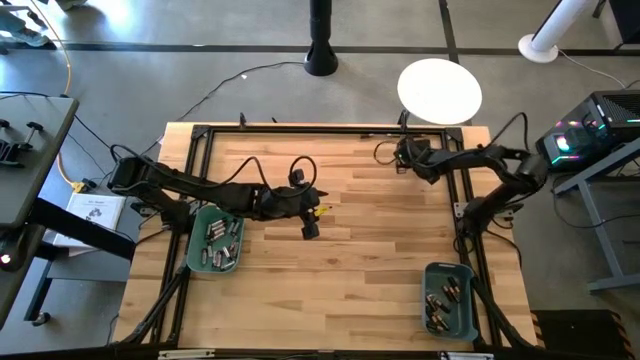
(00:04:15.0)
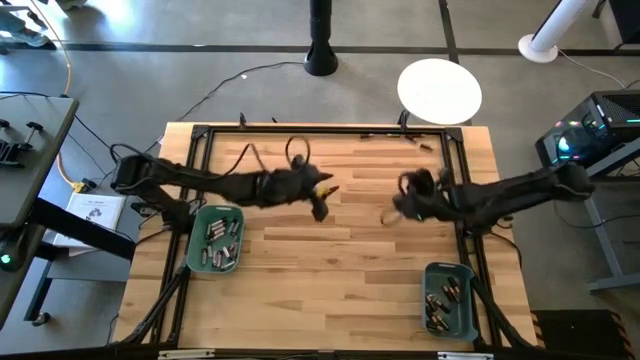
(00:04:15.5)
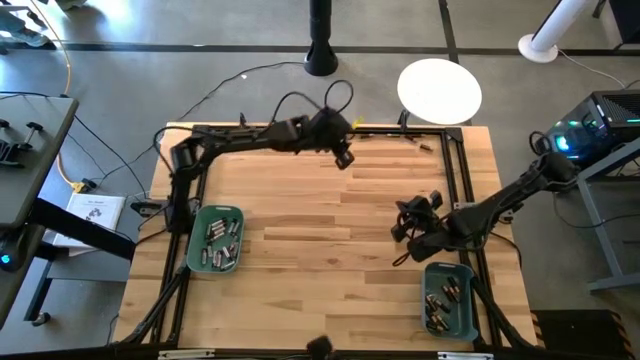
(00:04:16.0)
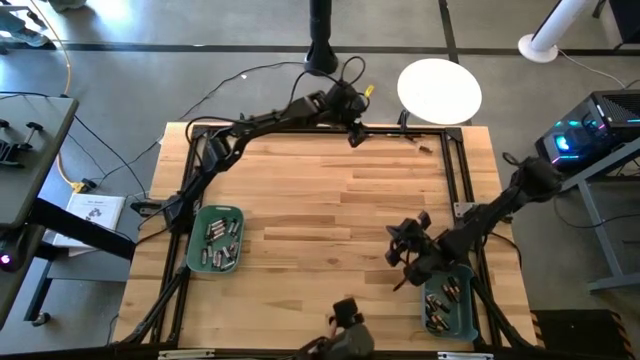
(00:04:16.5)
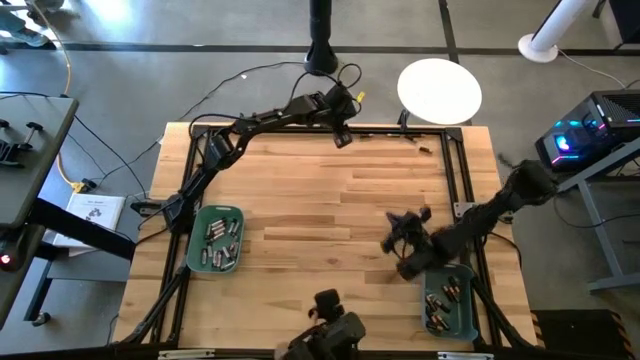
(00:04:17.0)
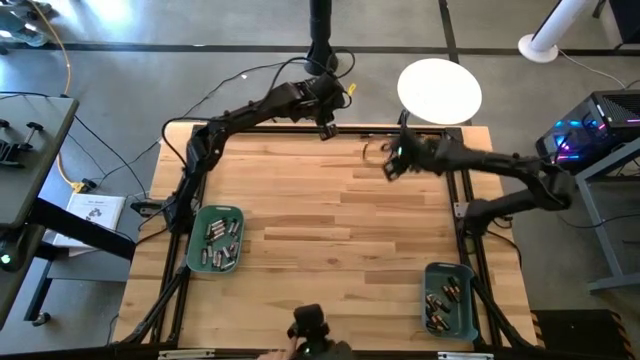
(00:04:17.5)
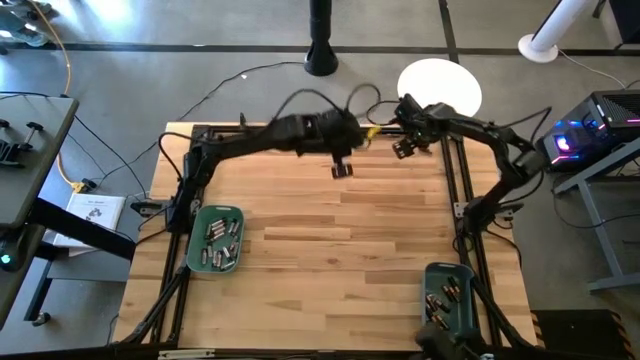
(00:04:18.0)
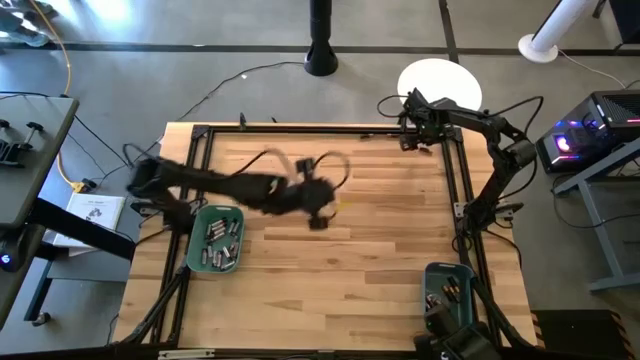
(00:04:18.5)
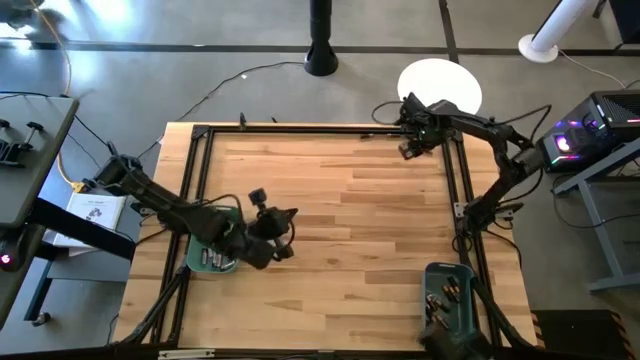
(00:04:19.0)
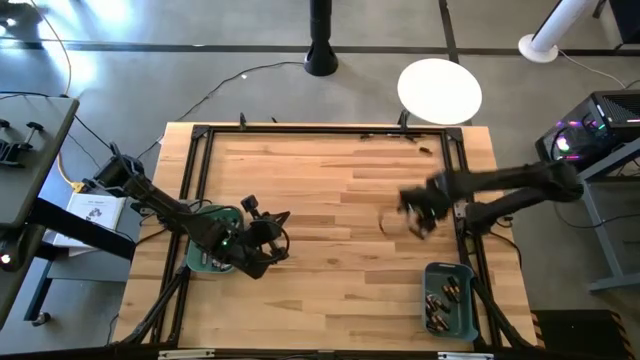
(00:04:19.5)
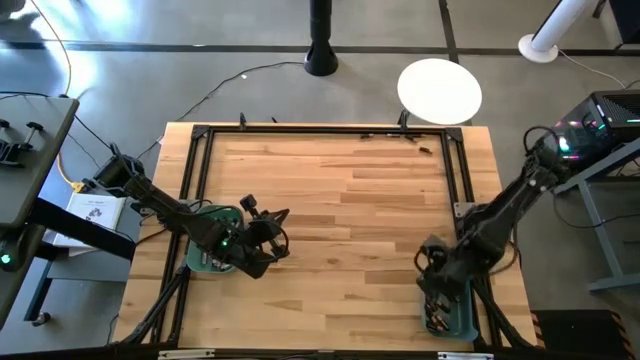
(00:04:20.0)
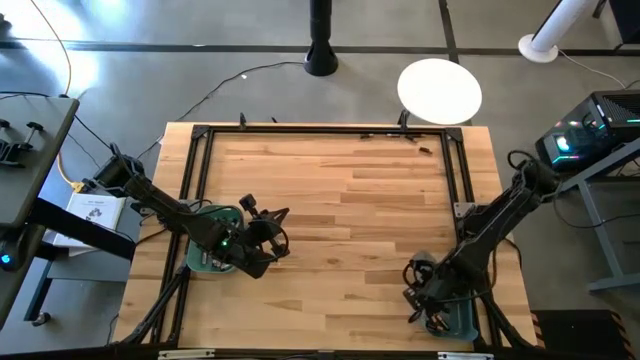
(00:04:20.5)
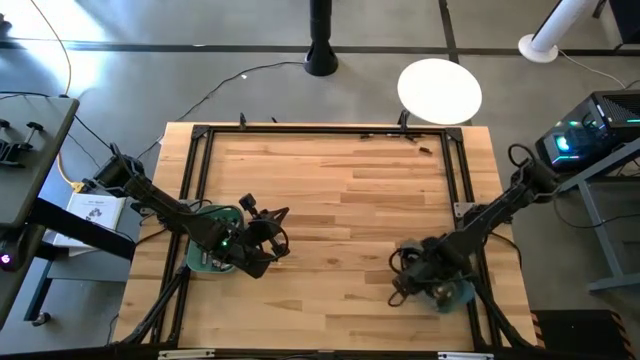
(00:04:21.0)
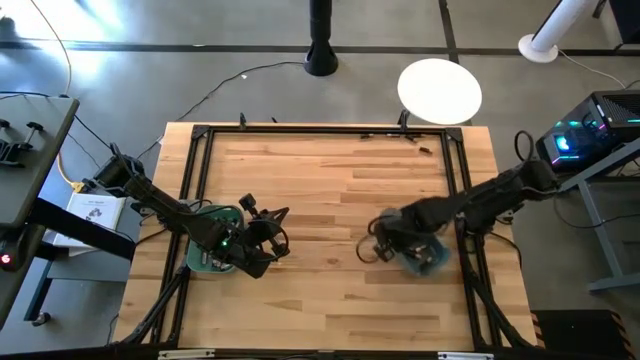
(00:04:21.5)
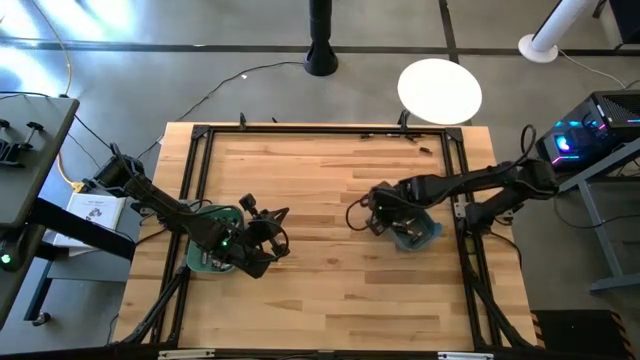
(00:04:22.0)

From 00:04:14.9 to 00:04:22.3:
Task: Sort batteries
Adjust the blue bin

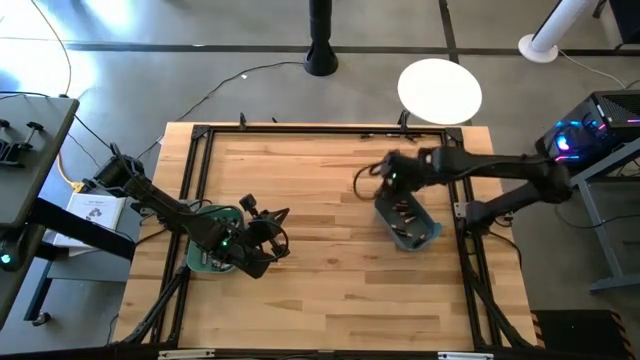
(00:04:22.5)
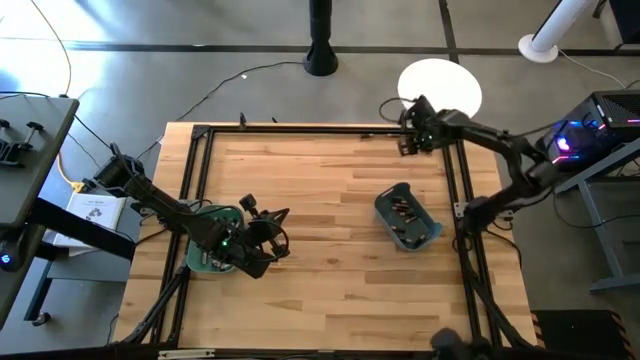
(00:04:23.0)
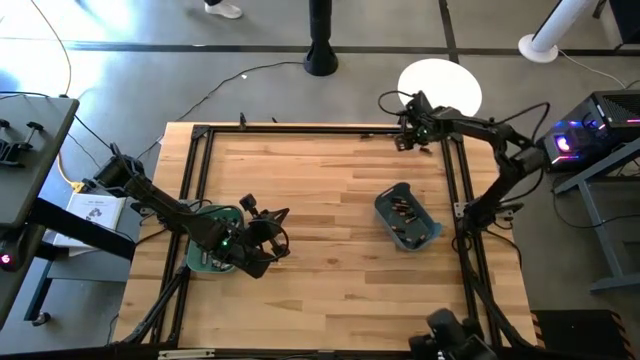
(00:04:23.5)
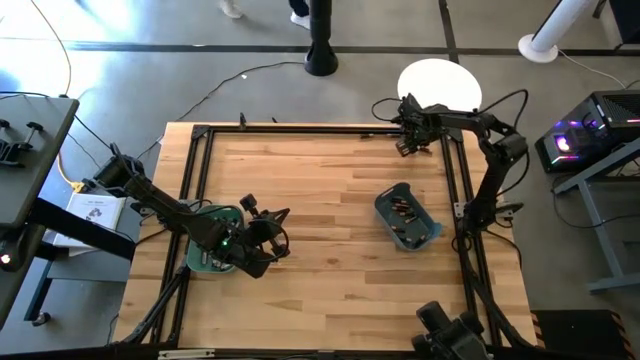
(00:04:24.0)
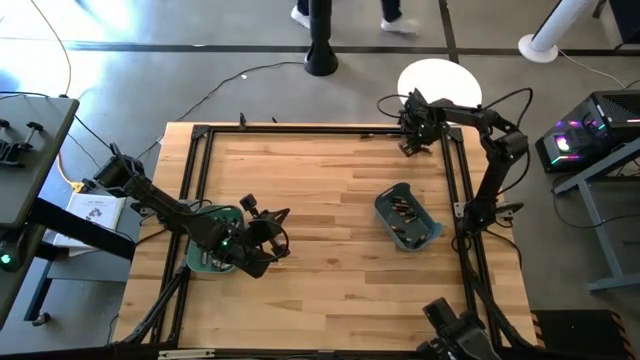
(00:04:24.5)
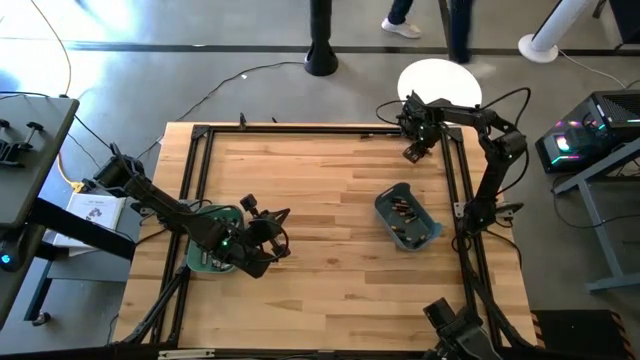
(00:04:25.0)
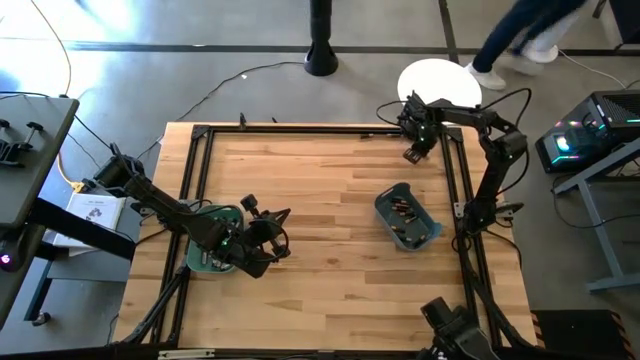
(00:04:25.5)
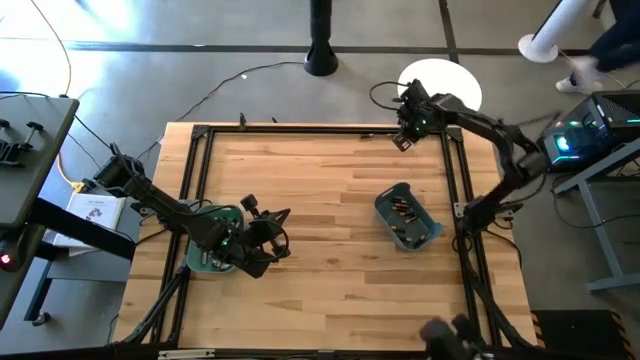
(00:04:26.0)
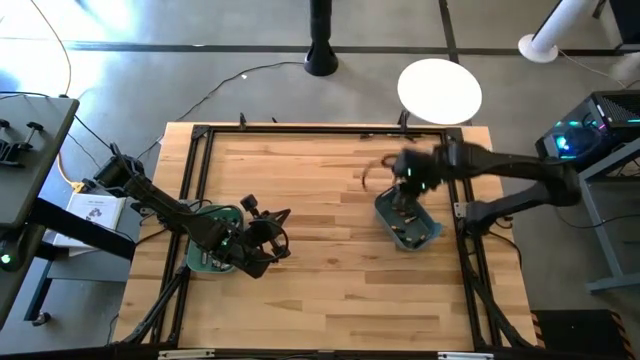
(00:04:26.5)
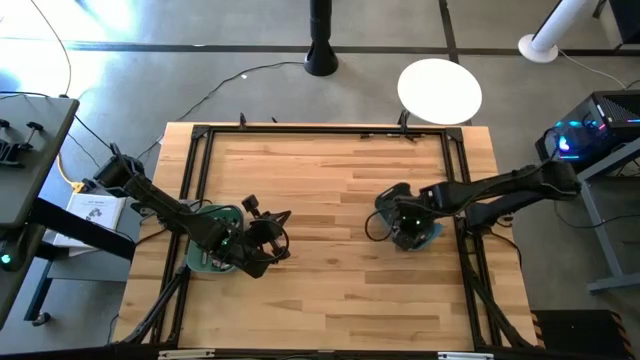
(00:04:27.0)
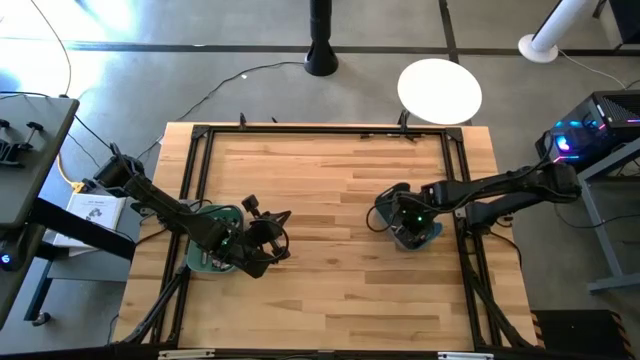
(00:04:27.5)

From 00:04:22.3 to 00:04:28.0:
Put the black battery into the blue bin

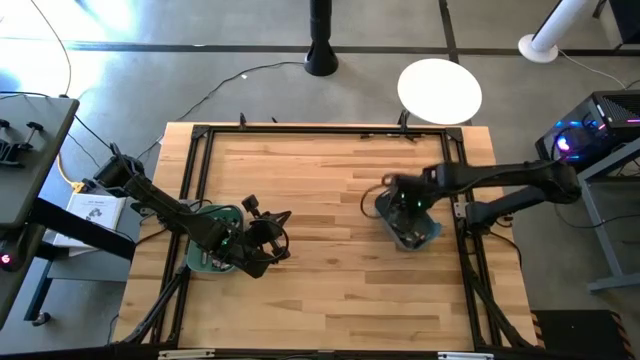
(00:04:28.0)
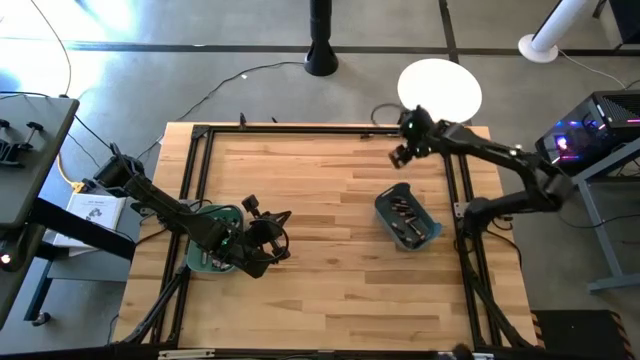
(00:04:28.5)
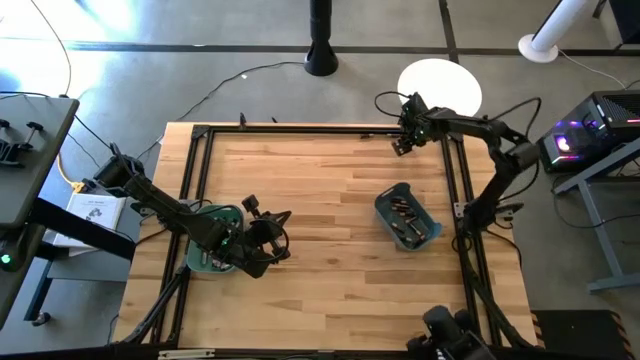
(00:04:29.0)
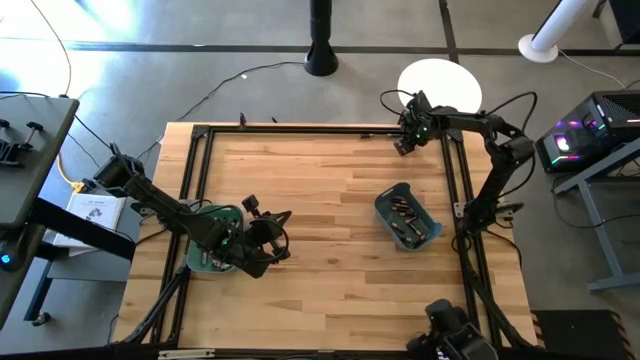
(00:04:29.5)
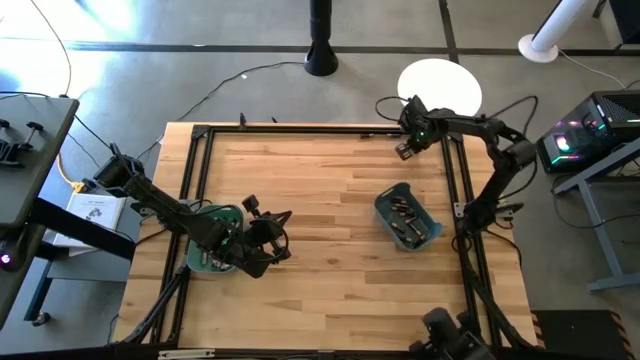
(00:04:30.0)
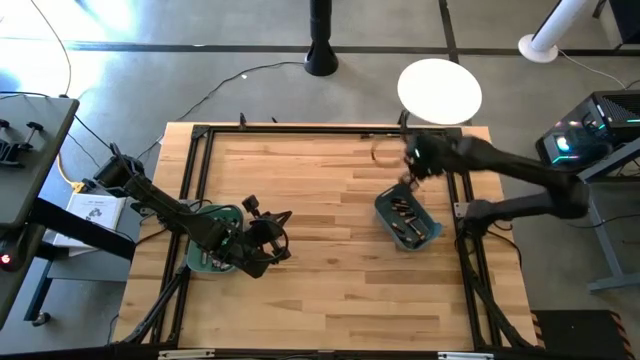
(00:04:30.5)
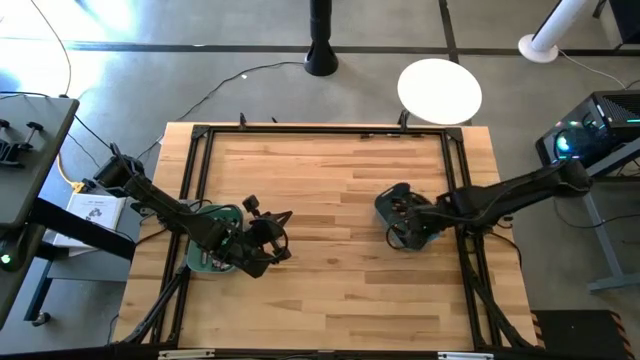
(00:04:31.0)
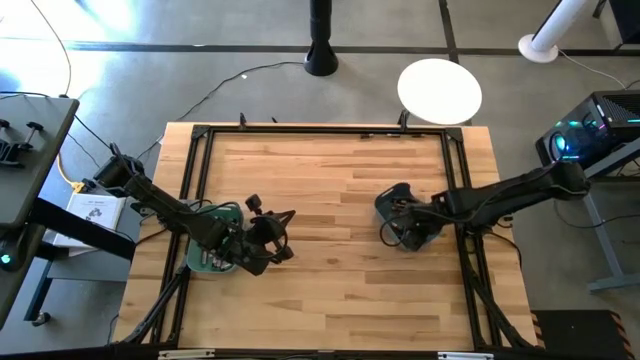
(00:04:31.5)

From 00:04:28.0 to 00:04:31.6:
Put the black battery into the blue bin
